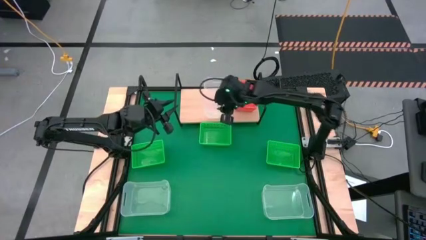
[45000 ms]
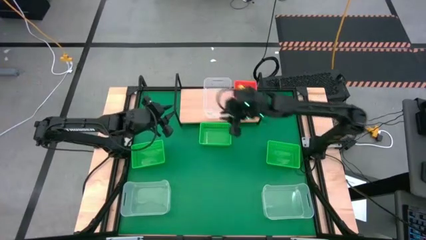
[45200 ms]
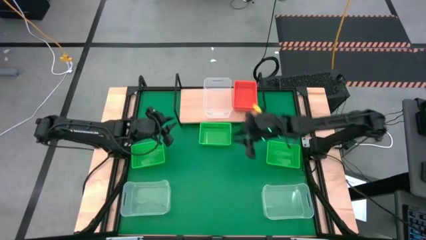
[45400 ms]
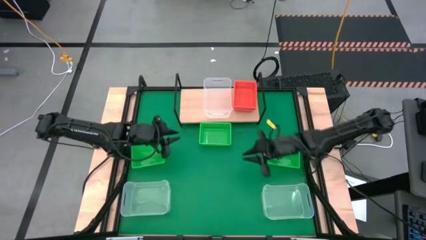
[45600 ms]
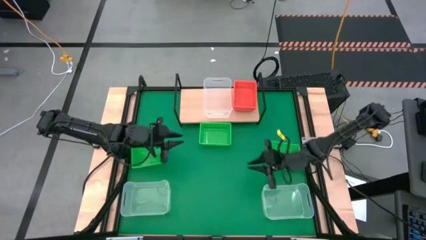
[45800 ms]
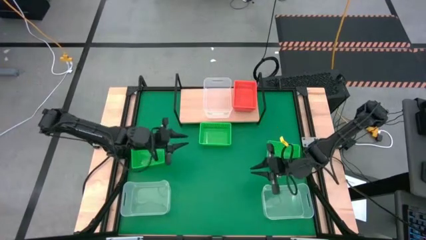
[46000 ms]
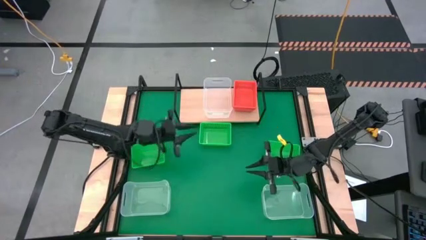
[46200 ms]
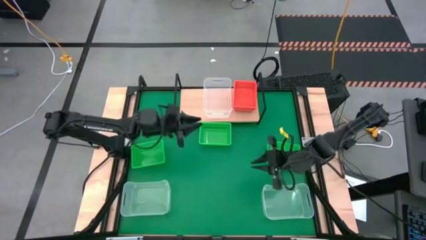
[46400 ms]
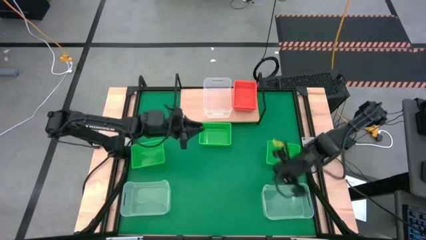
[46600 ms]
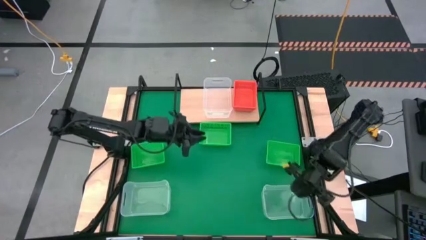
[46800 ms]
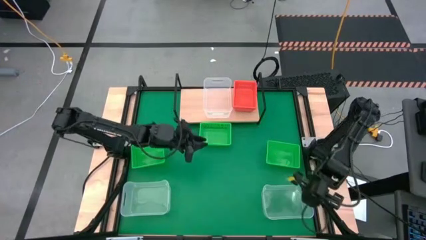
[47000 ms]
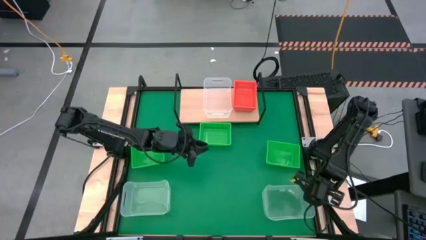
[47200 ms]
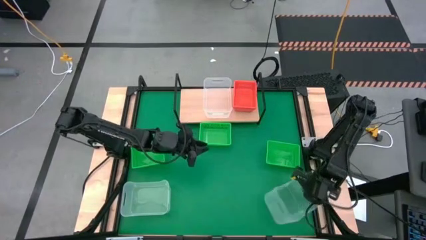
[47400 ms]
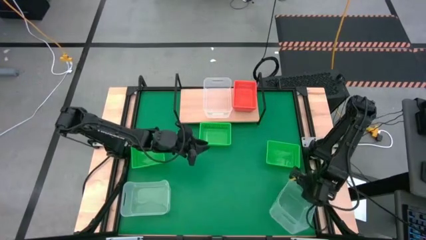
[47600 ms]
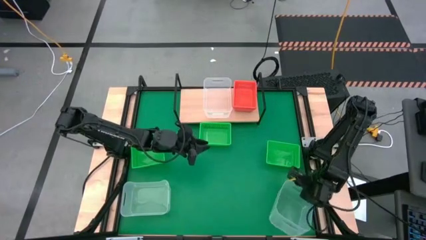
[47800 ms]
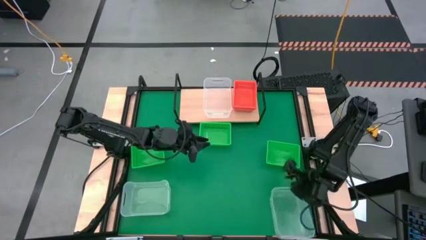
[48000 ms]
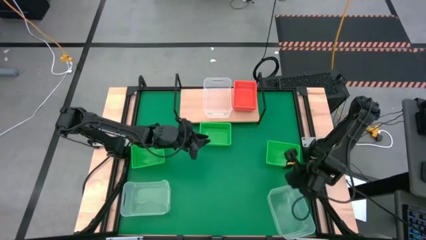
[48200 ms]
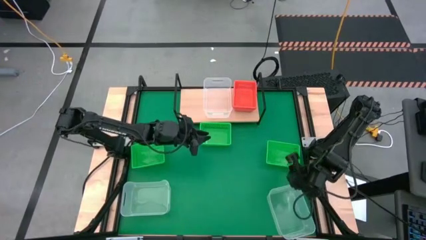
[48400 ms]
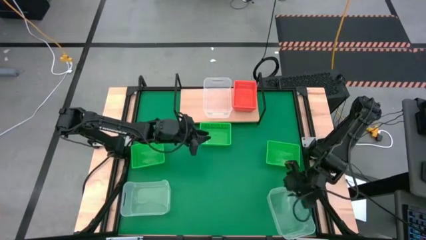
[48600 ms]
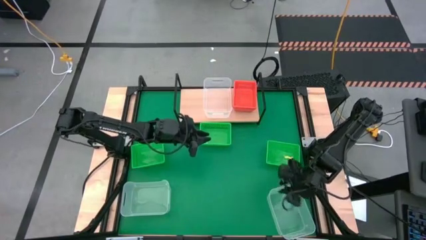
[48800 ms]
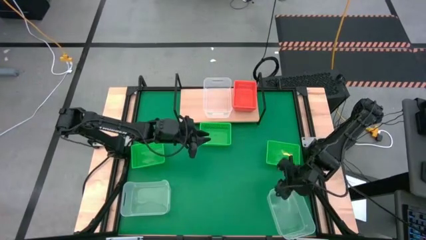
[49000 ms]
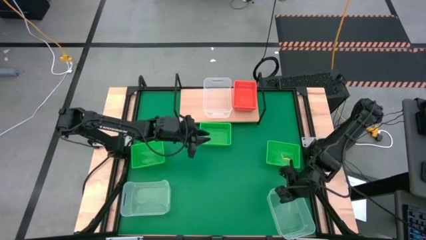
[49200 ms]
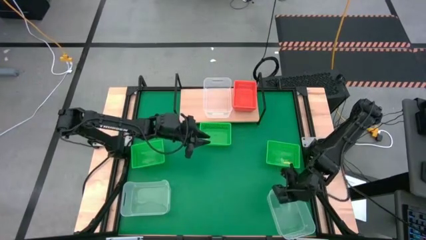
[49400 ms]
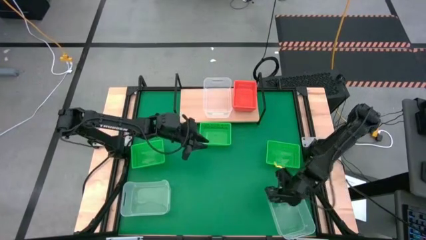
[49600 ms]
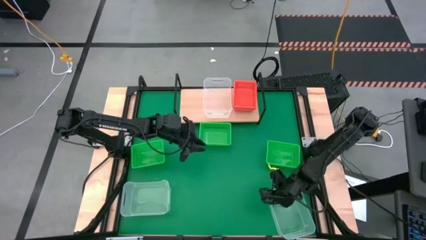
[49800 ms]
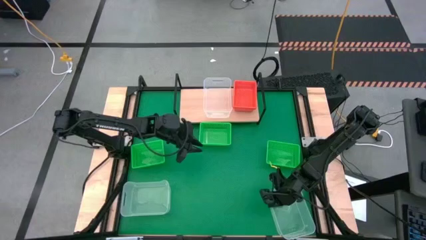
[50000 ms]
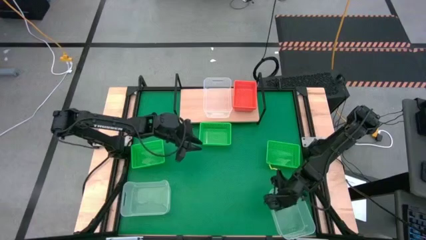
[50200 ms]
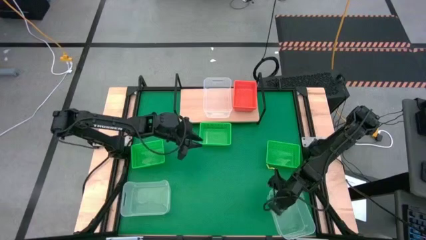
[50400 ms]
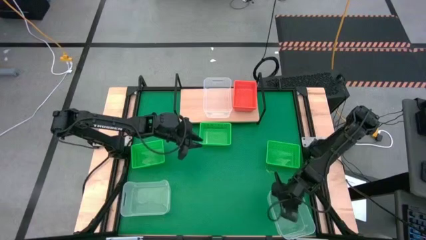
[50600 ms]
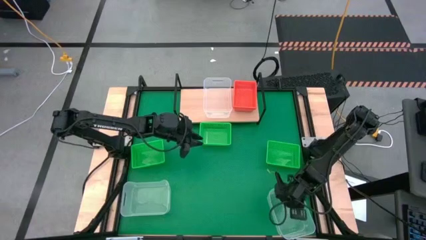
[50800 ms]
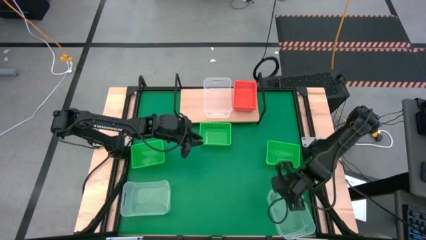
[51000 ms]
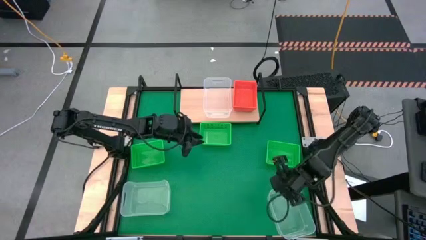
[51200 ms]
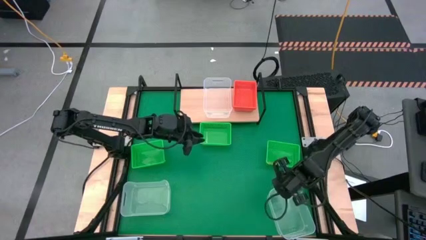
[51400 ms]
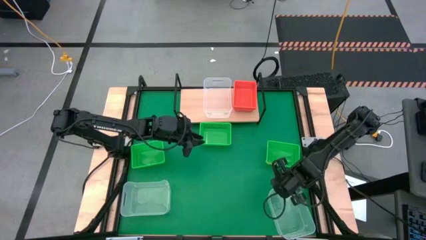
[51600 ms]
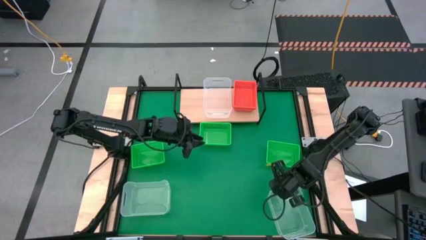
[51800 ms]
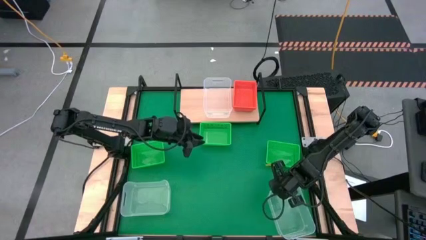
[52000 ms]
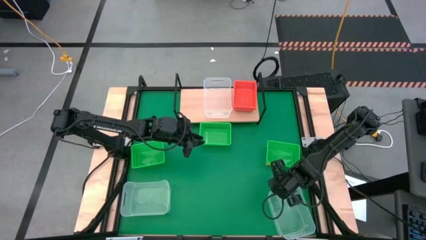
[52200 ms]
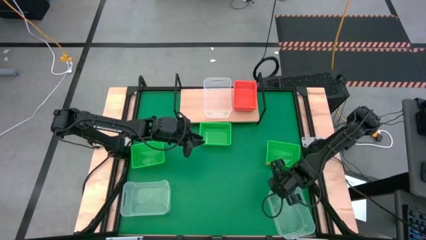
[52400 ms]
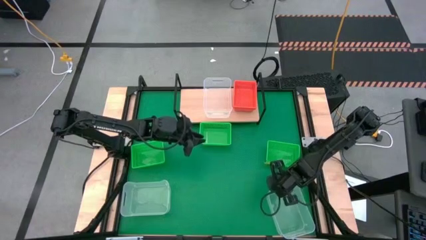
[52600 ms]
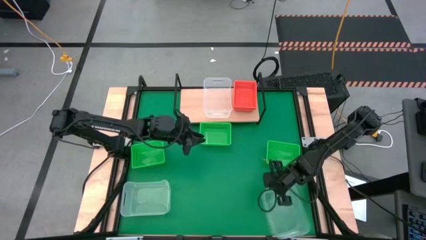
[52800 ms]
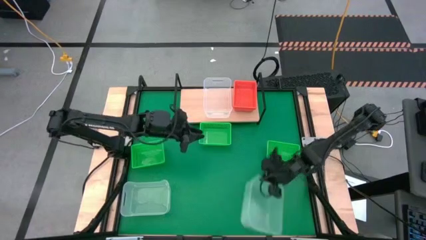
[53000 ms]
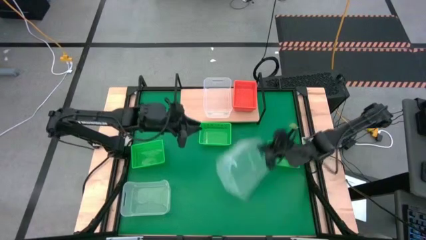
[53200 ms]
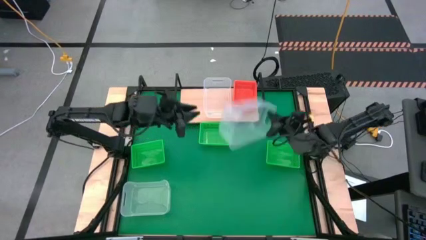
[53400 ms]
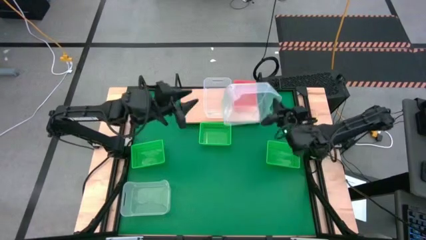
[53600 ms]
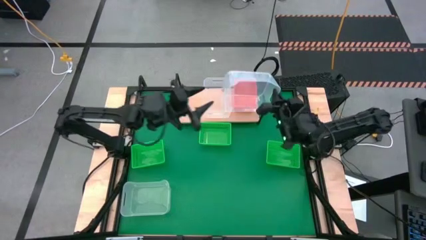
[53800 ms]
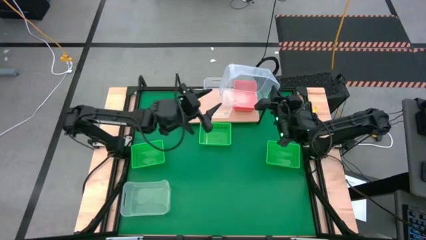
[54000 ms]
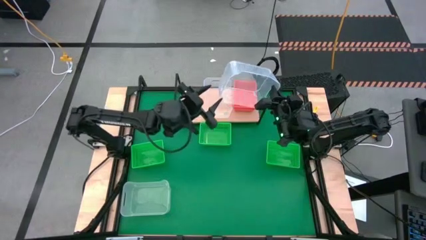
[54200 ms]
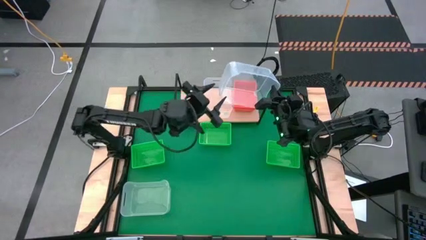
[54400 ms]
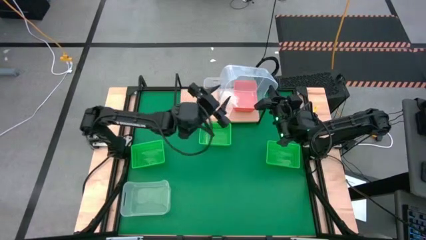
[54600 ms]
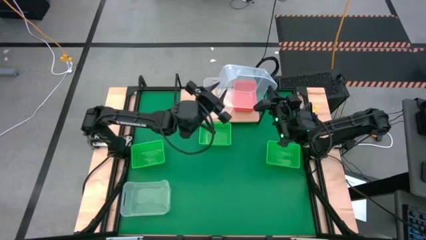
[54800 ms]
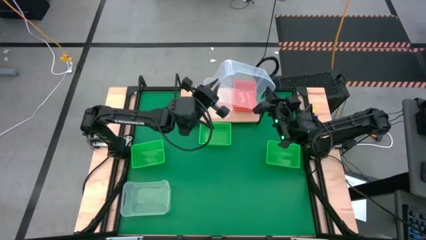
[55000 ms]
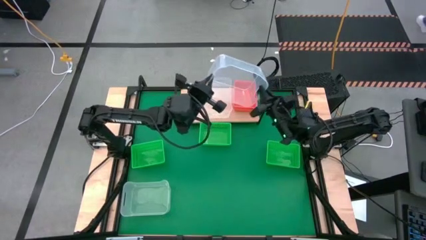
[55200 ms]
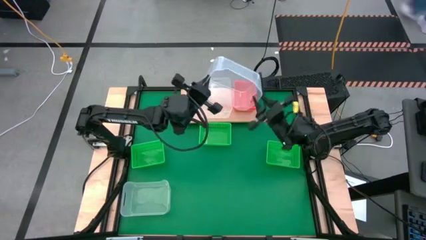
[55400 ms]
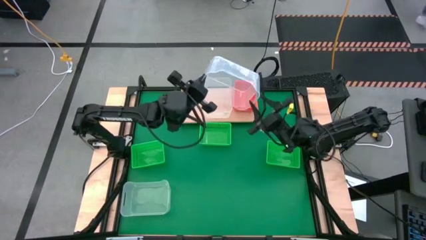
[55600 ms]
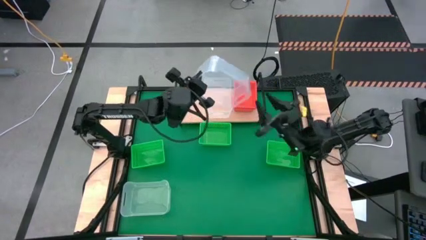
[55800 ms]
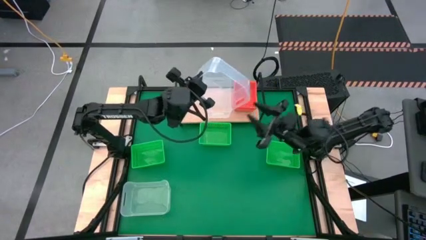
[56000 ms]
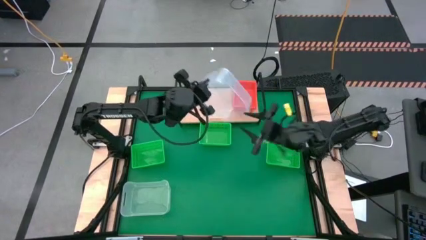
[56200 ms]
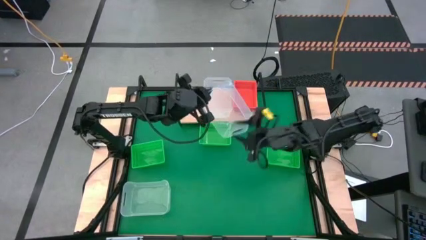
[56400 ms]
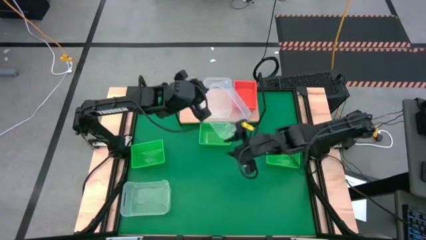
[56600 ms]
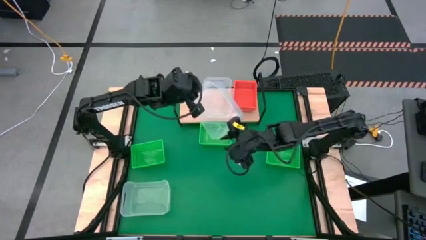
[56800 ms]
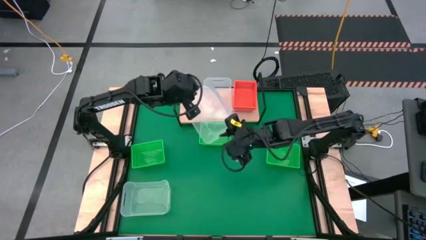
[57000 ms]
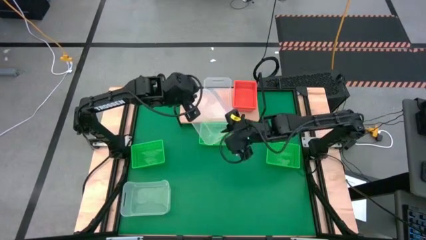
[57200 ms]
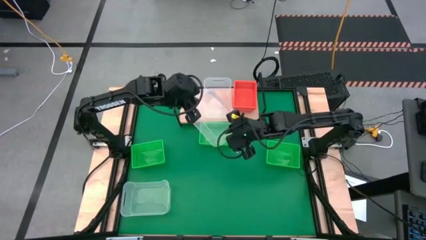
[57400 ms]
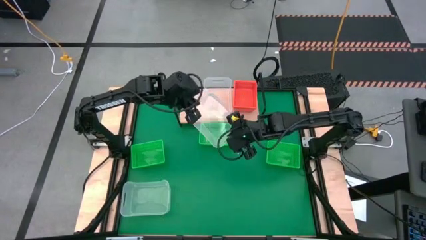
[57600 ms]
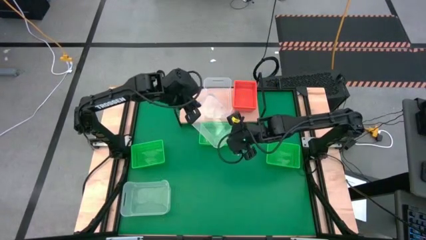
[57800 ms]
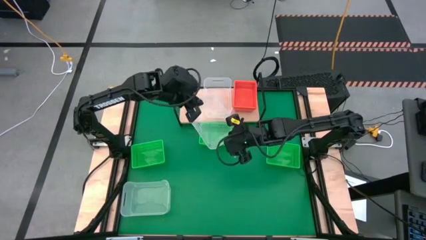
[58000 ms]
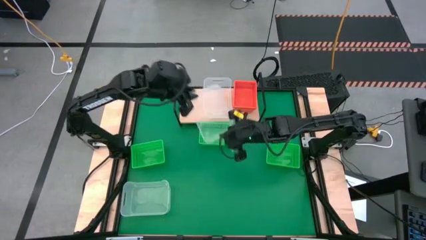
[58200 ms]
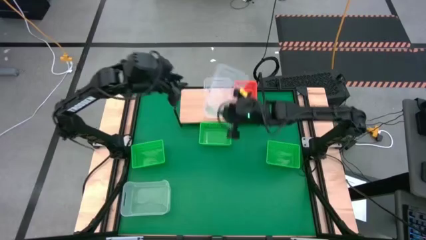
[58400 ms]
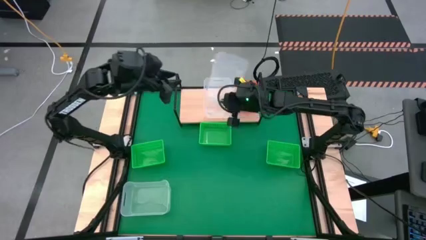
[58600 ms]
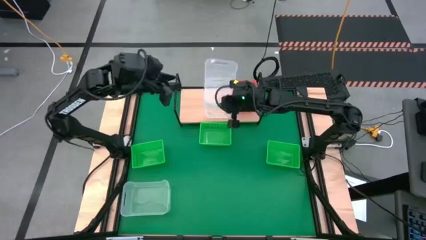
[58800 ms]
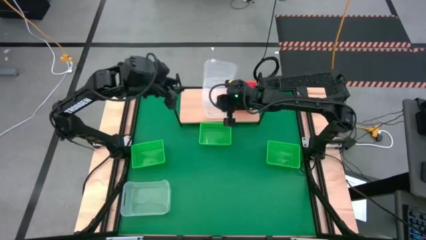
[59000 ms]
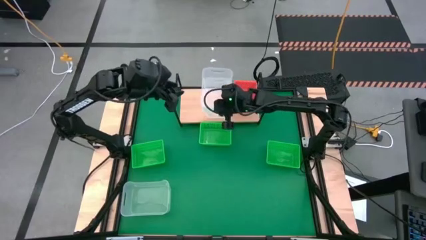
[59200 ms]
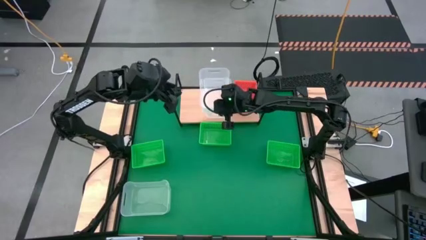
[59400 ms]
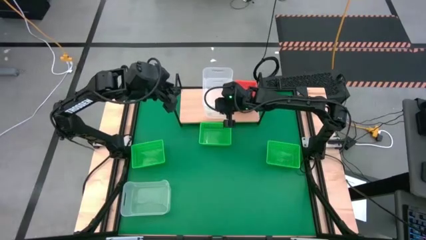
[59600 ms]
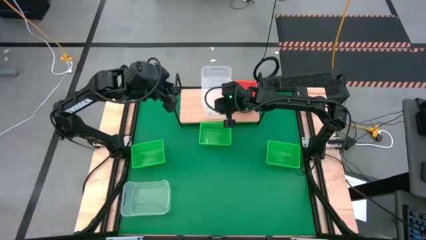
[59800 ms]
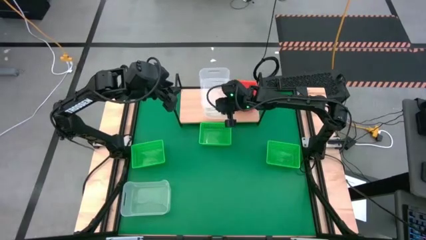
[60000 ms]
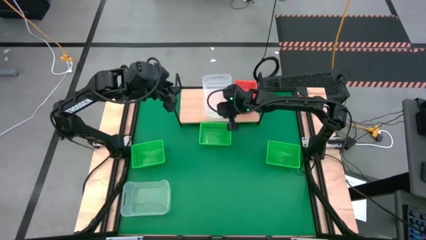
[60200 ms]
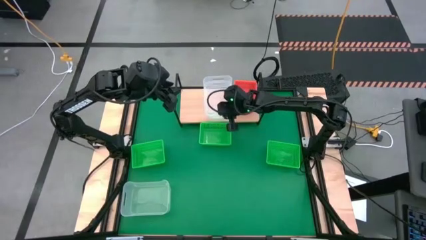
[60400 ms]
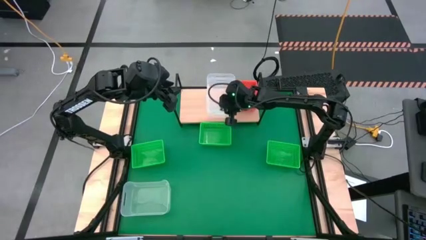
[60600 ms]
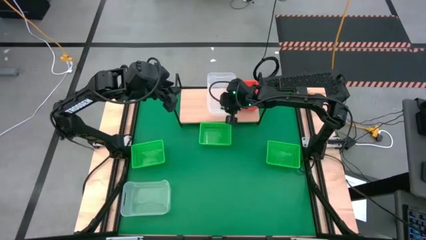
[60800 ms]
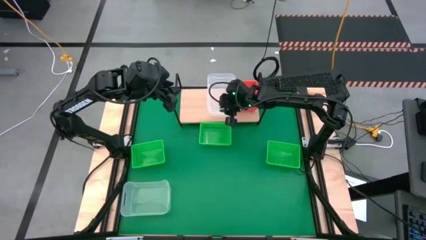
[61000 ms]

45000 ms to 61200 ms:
Task: Stack baskets on shelf by color
Stack the right transparent bin on top of the transparent bin on the shelf
